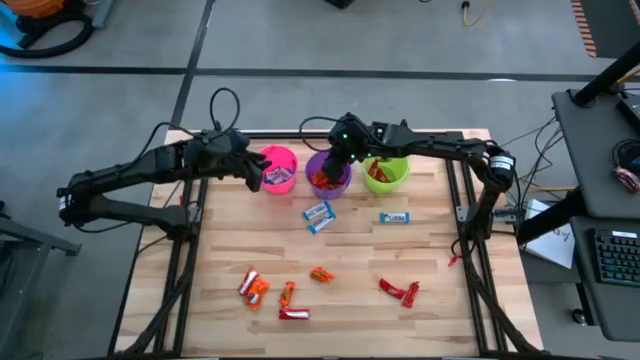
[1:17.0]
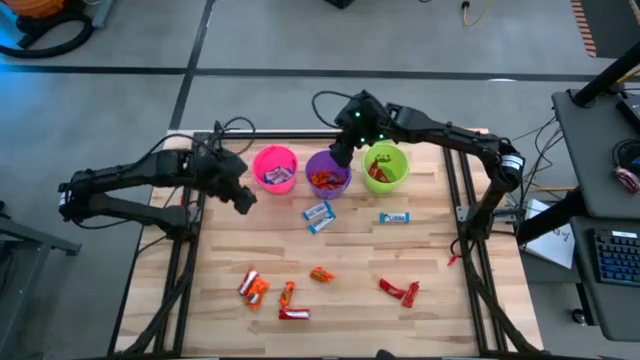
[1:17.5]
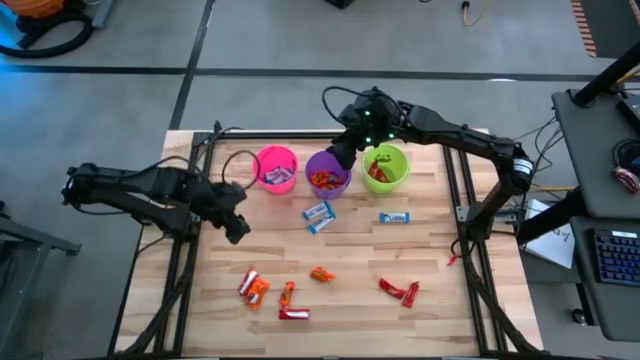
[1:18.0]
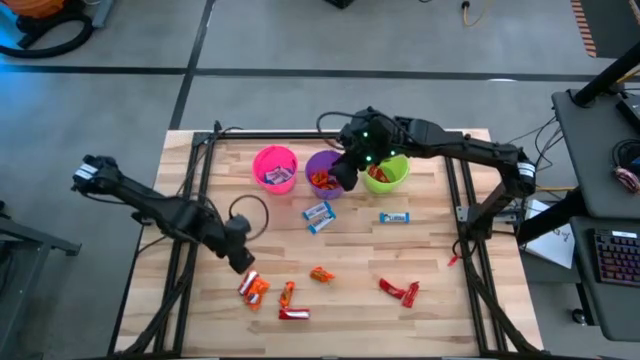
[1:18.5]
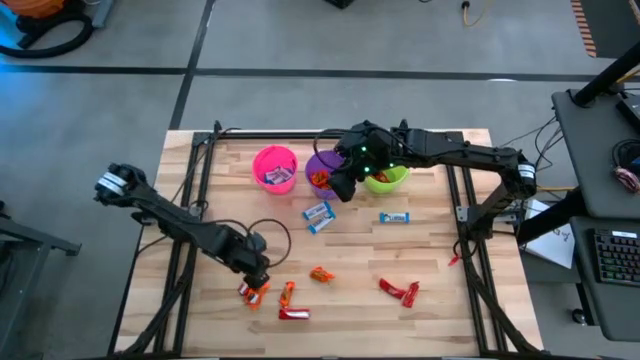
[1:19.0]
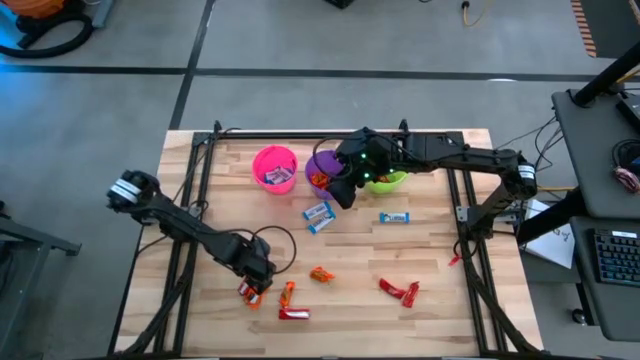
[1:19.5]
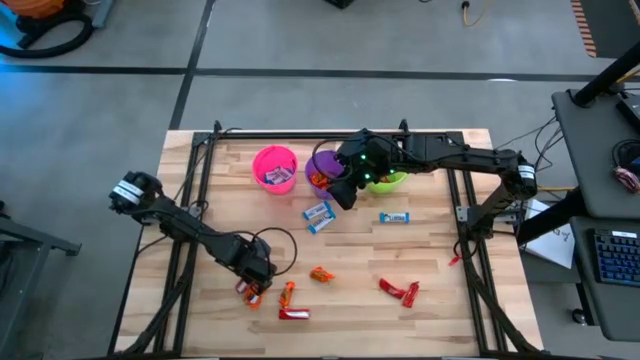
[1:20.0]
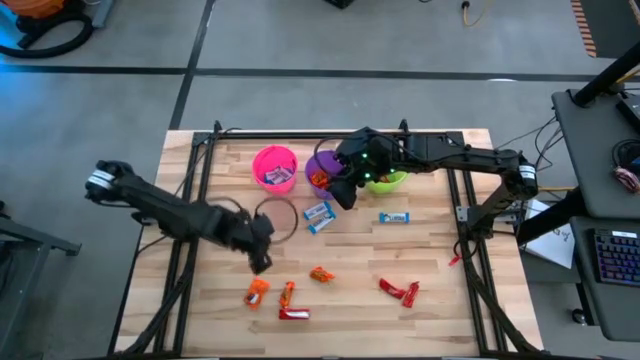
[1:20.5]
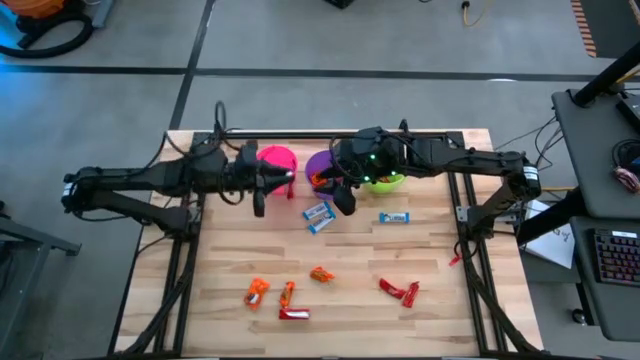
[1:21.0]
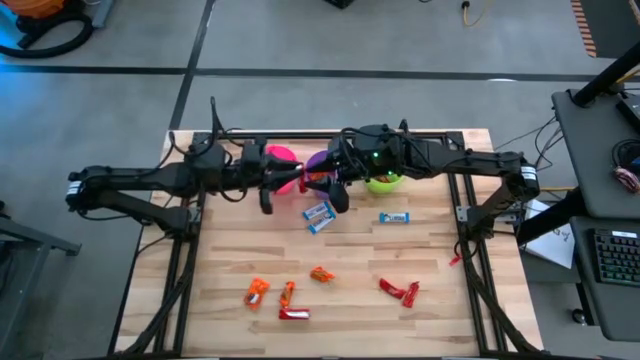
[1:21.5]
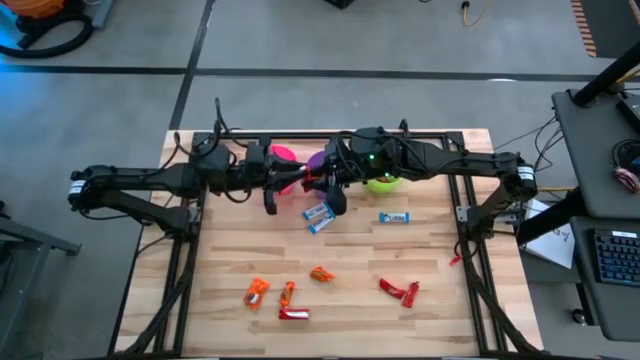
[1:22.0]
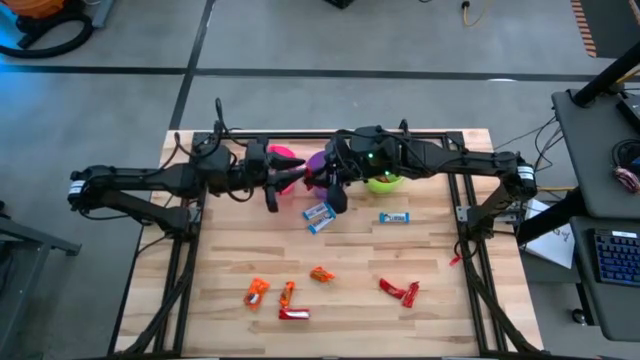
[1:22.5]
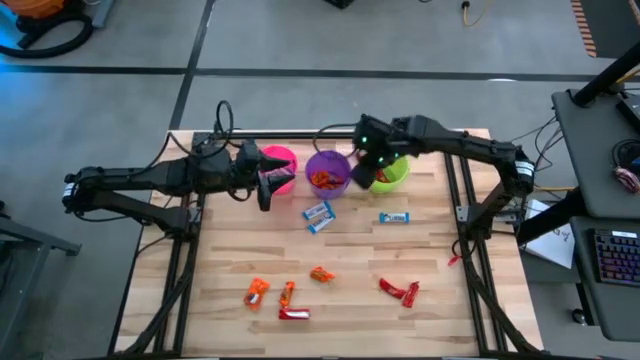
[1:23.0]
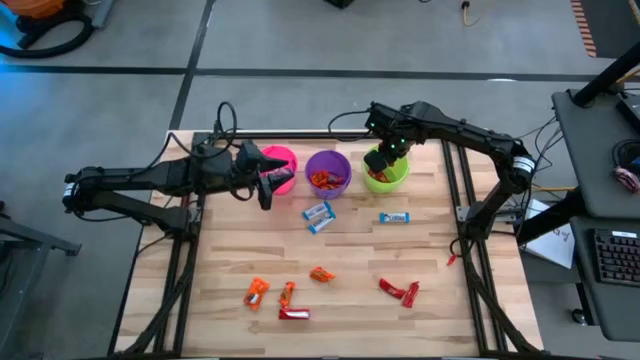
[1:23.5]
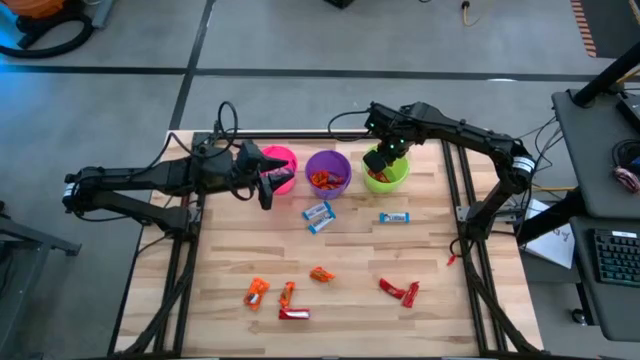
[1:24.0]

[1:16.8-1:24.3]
Task: Organize candy in baskets
Put the red chocolate into the green bucket

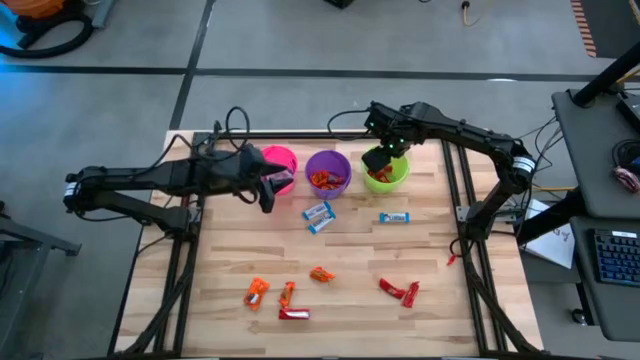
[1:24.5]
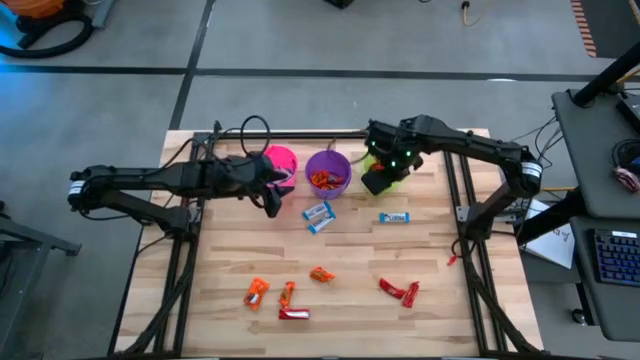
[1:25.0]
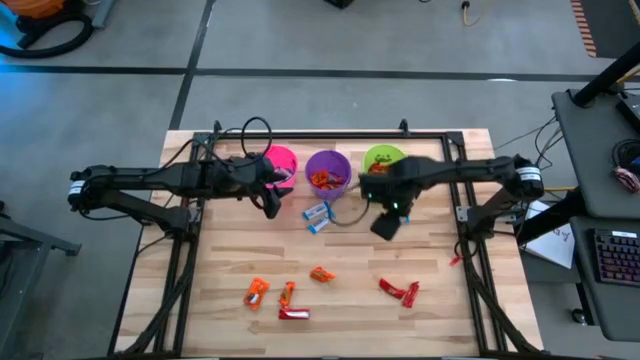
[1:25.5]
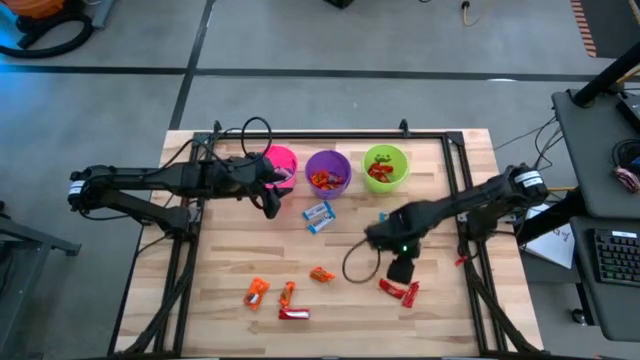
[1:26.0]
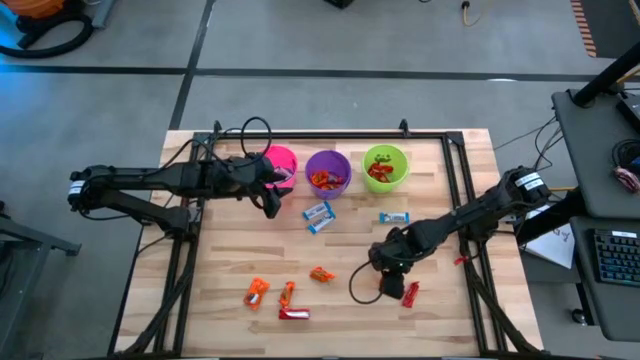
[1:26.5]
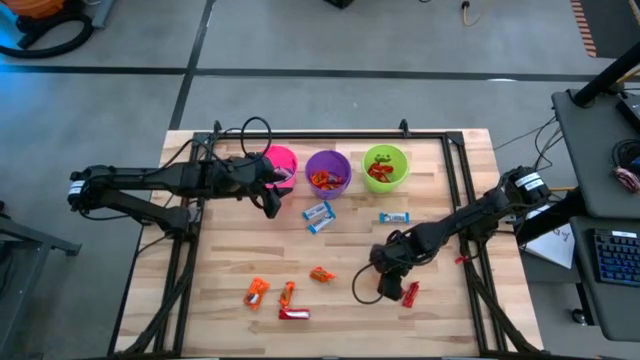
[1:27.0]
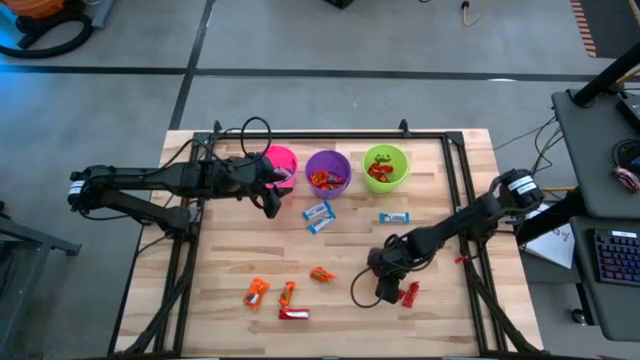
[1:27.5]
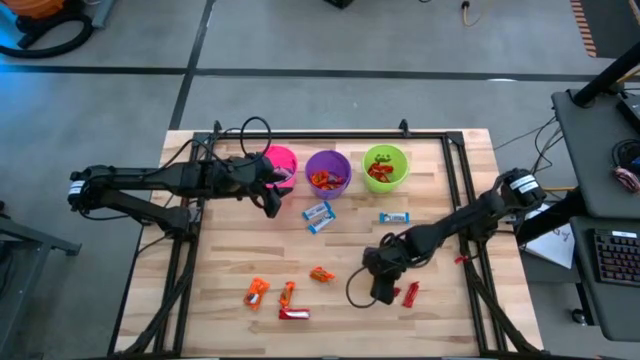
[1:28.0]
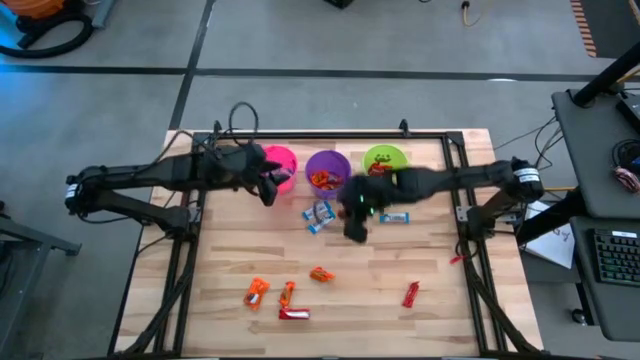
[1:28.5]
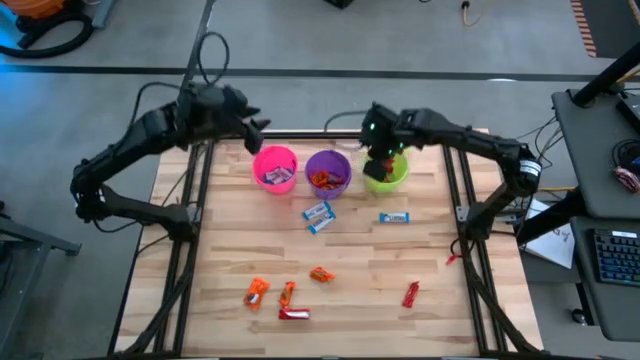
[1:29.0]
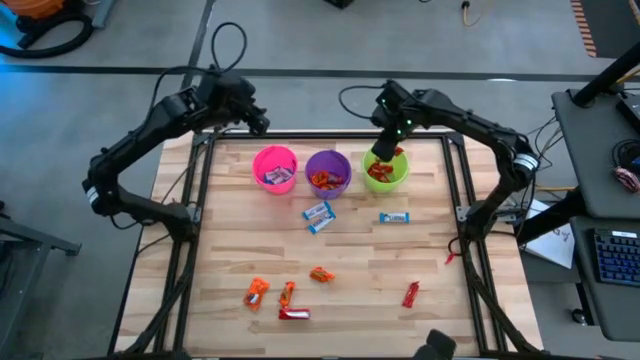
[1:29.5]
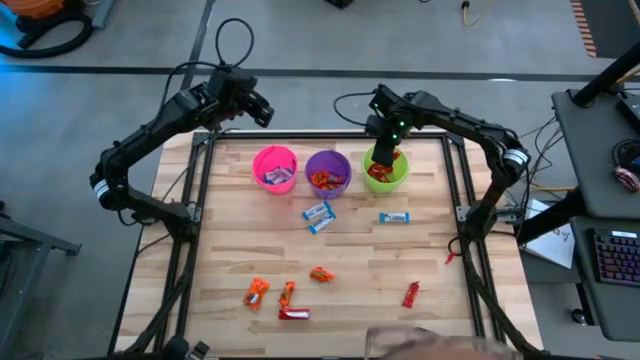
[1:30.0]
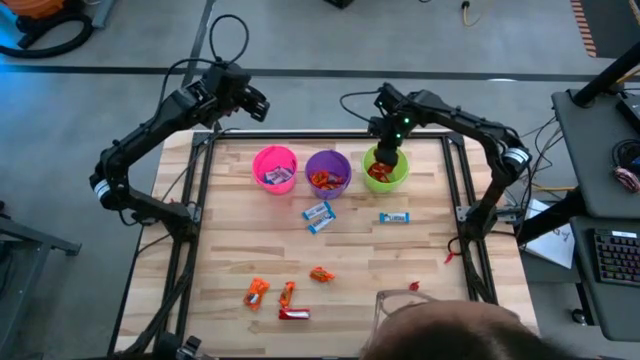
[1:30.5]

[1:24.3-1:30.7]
Put the red chocolate into the green bucket

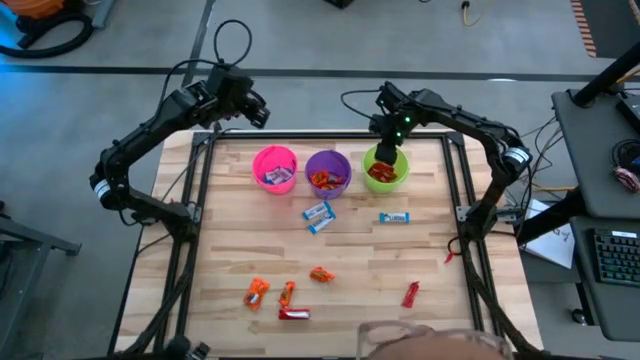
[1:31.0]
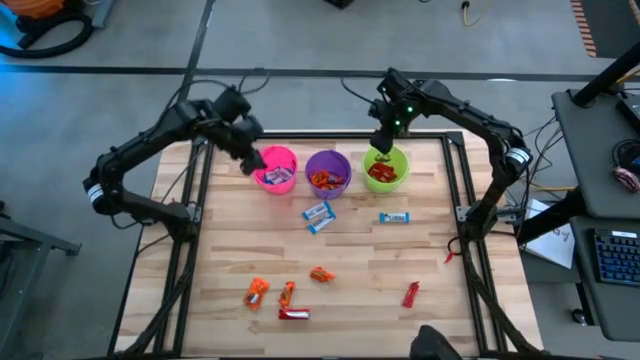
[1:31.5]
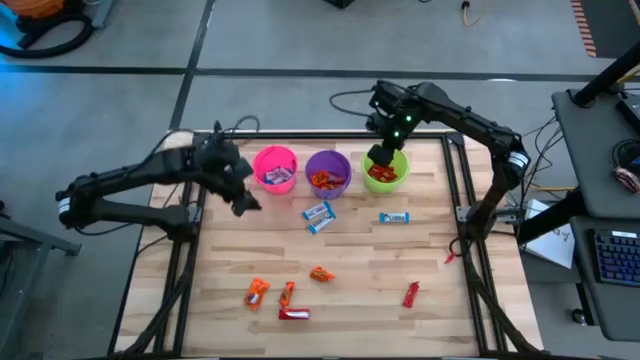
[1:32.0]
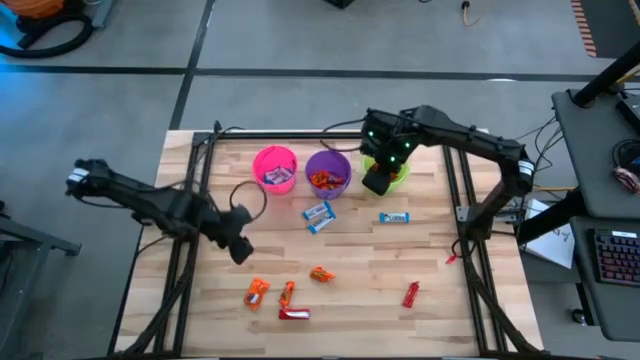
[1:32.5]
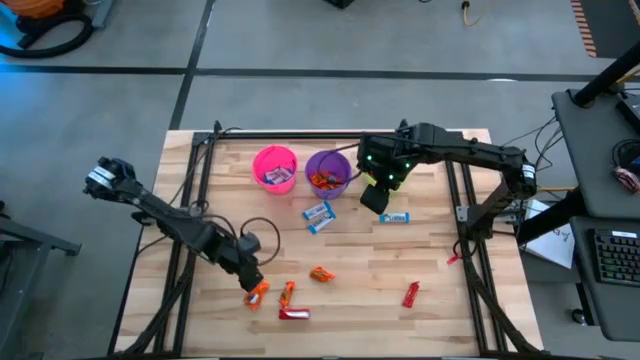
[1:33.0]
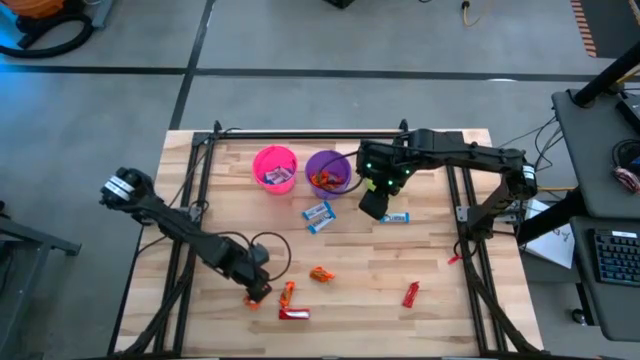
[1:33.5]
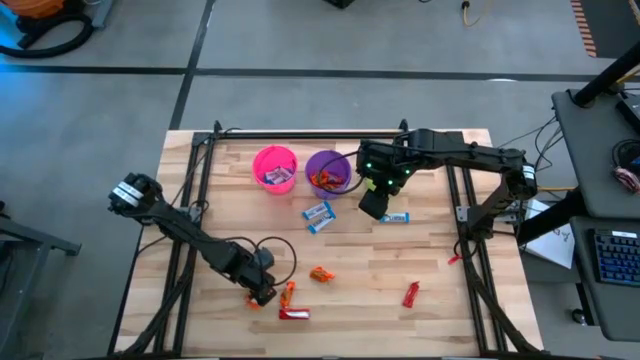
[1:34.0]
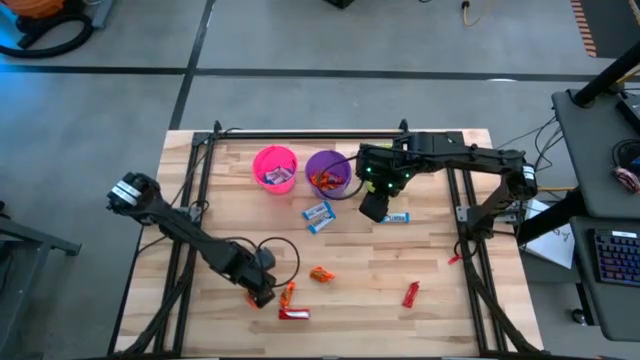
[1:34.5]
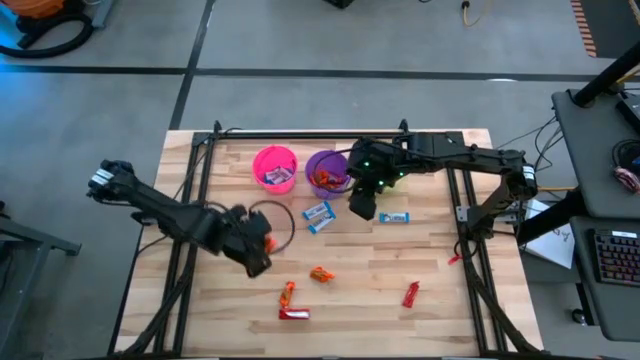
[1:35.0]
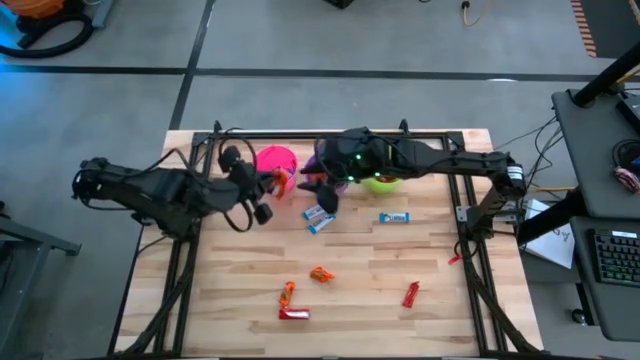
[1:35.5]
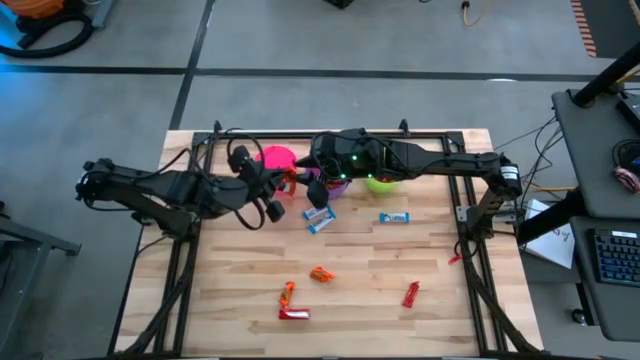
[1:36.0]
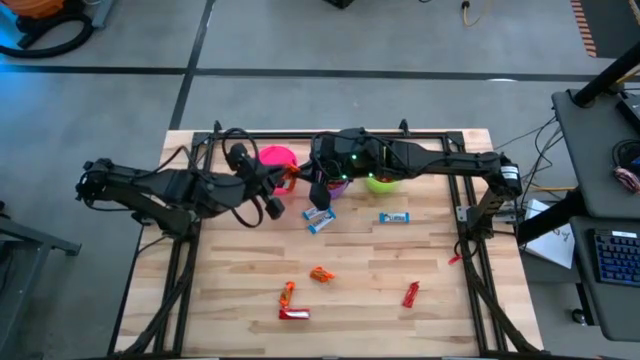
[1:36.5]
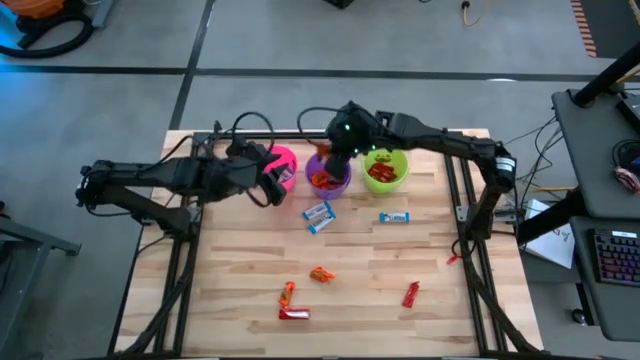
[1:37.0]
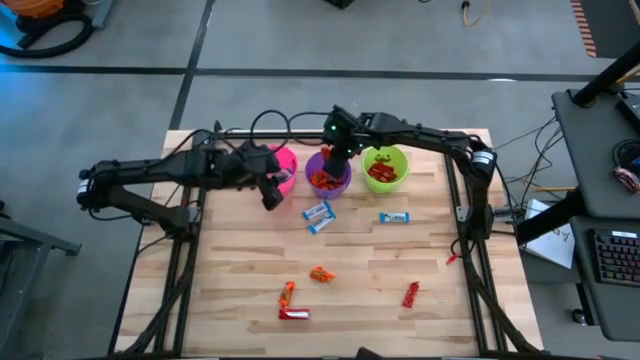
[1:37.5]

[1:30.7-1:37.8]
Put the orange chocolate into the violet bucket

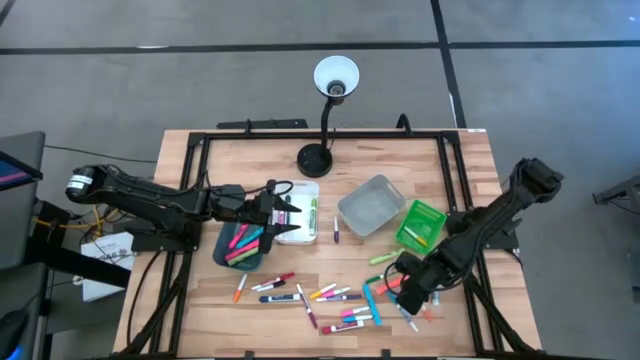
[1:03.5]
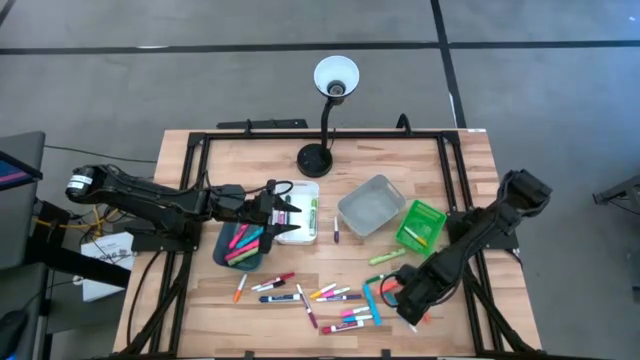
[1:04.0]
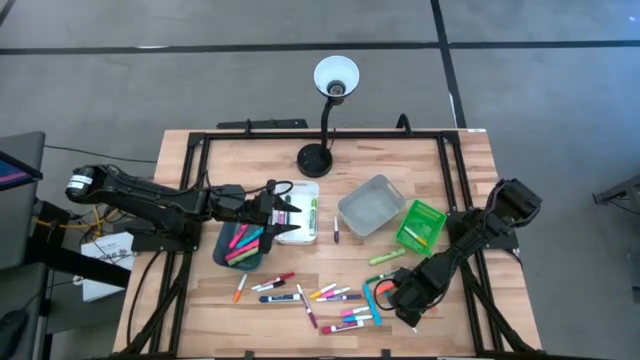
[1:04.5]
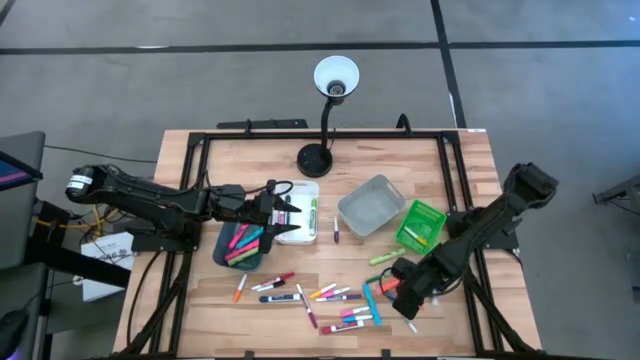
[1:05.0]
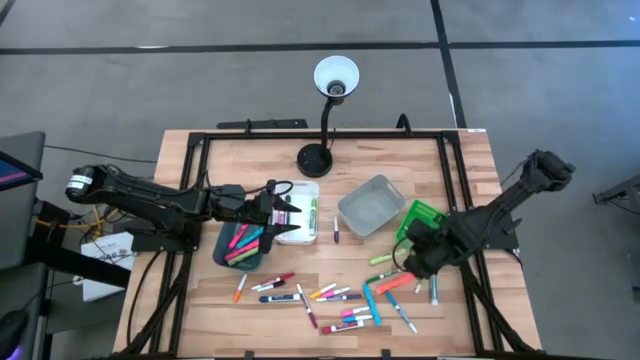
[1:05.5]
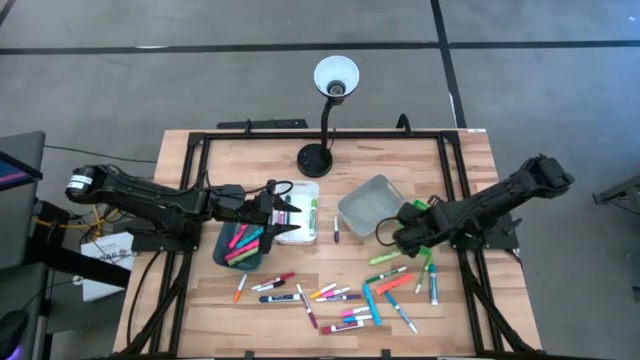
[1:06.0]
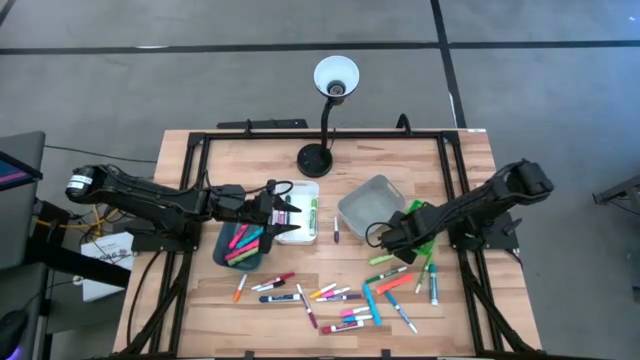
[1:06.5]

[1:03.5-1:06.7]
Task: Pick & Place Markers
Put the right orange mini marker into the green bin
